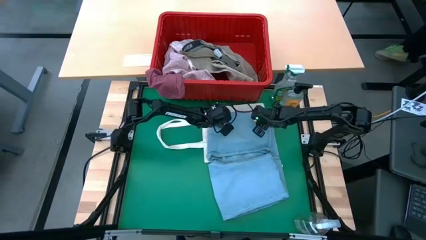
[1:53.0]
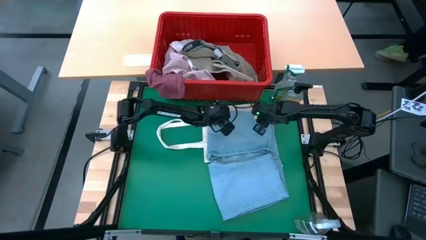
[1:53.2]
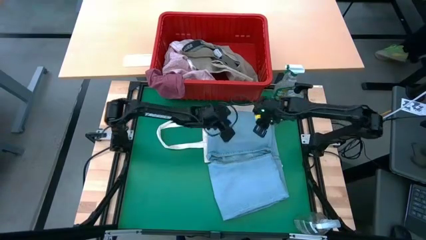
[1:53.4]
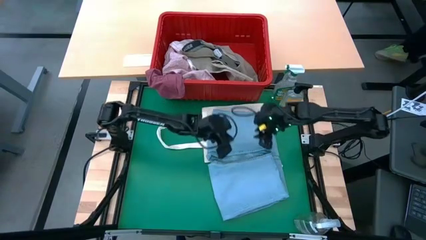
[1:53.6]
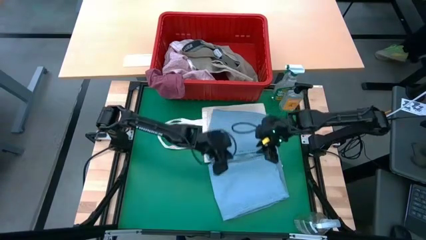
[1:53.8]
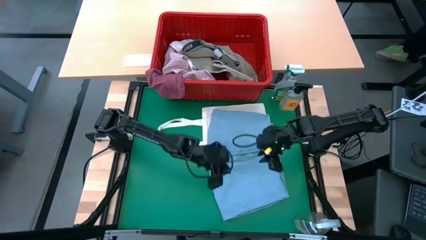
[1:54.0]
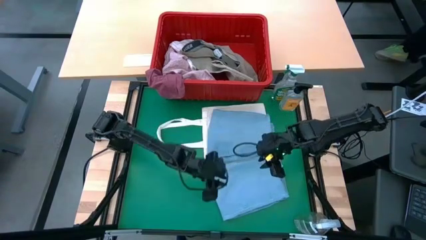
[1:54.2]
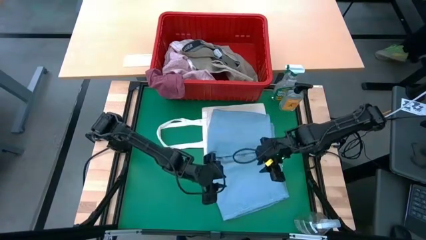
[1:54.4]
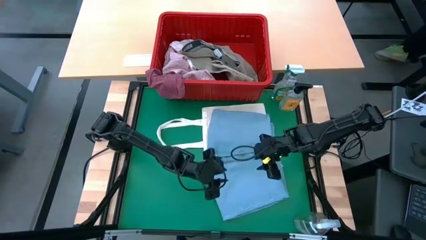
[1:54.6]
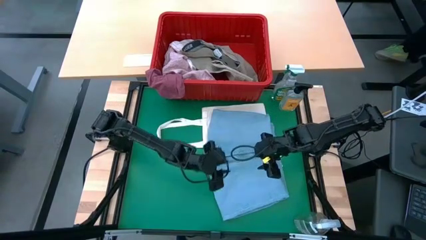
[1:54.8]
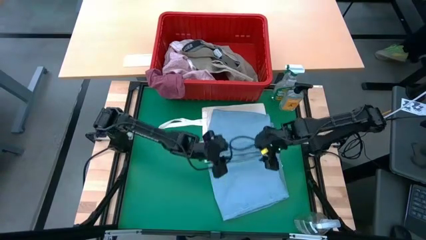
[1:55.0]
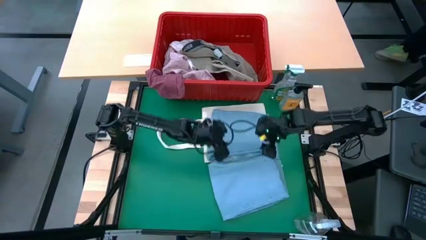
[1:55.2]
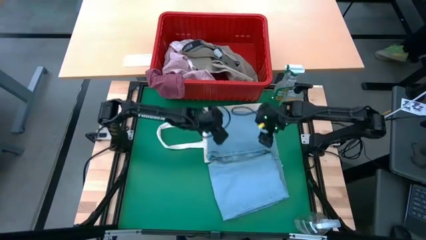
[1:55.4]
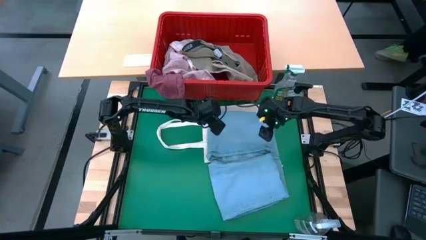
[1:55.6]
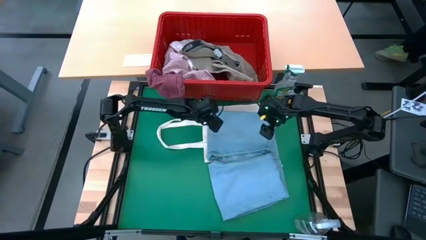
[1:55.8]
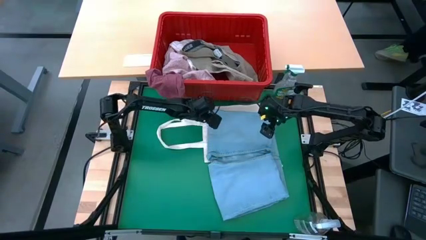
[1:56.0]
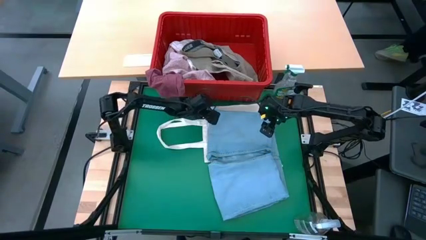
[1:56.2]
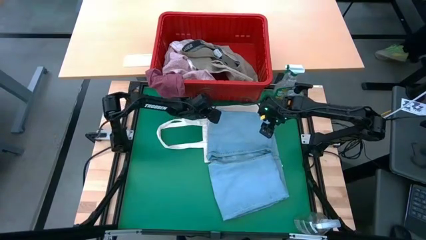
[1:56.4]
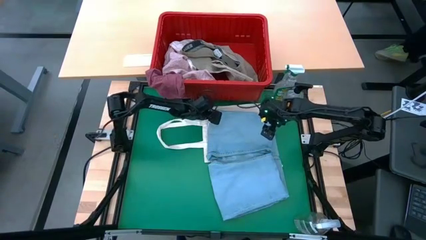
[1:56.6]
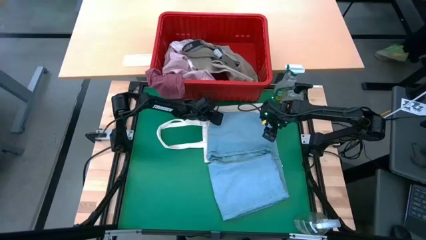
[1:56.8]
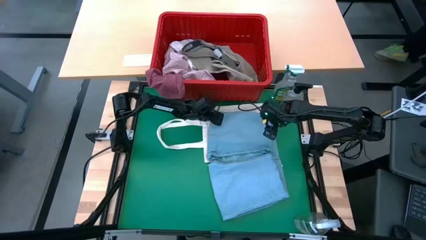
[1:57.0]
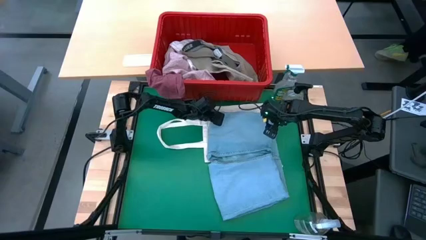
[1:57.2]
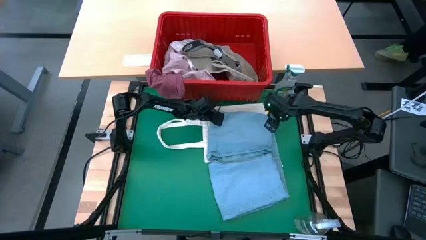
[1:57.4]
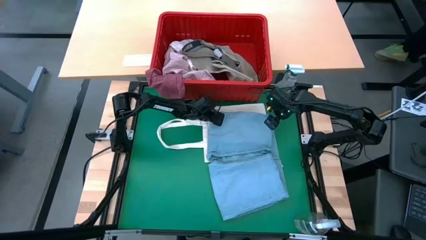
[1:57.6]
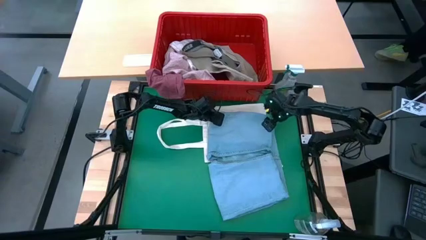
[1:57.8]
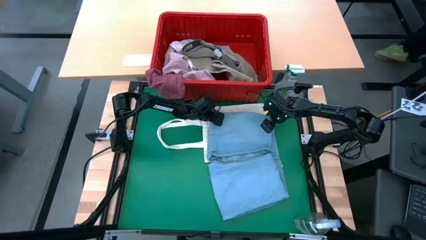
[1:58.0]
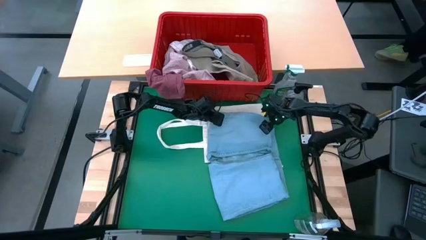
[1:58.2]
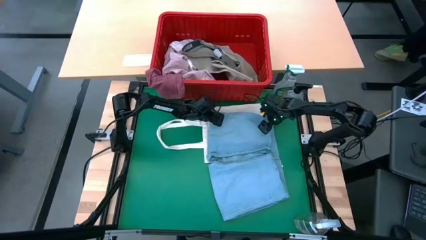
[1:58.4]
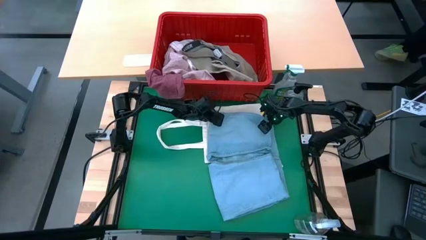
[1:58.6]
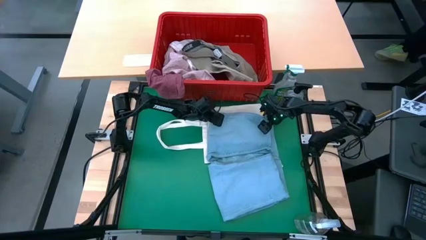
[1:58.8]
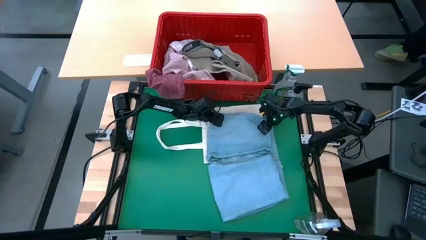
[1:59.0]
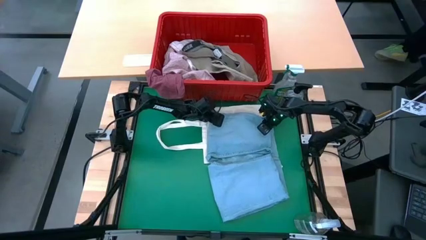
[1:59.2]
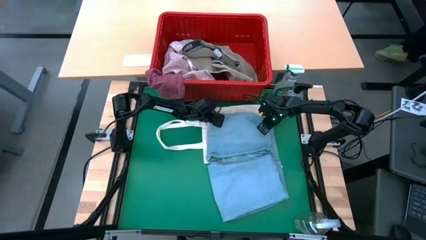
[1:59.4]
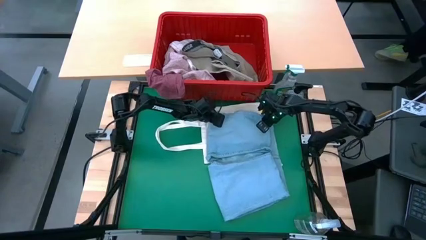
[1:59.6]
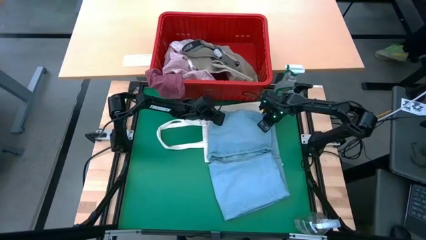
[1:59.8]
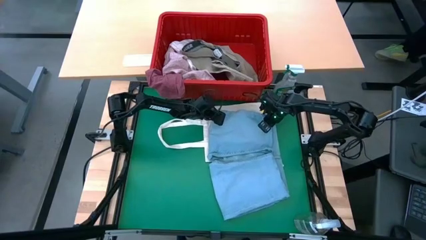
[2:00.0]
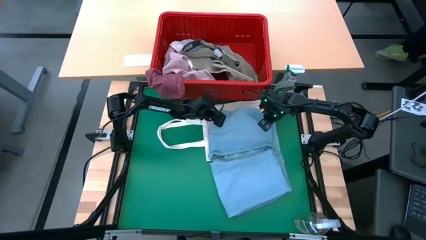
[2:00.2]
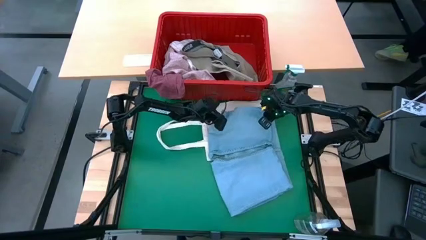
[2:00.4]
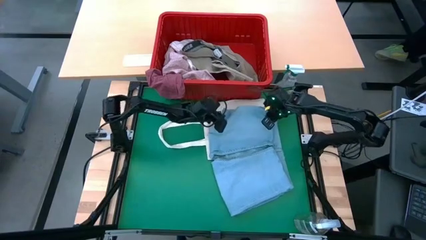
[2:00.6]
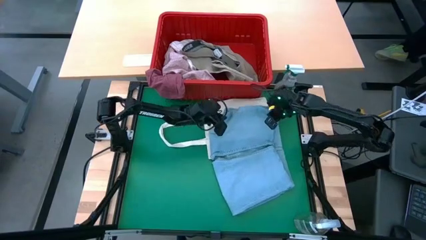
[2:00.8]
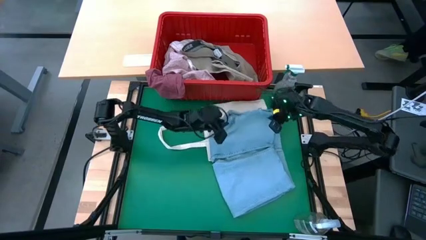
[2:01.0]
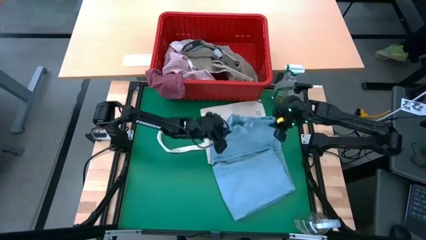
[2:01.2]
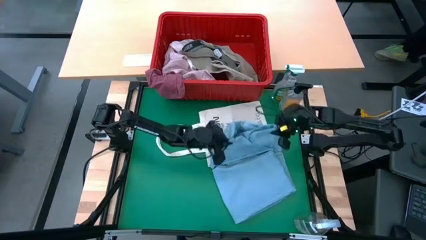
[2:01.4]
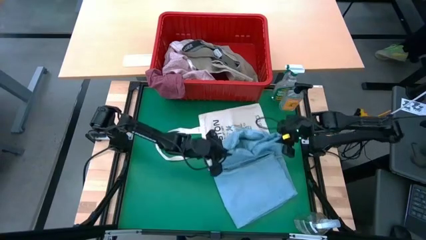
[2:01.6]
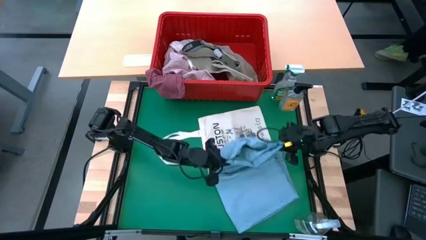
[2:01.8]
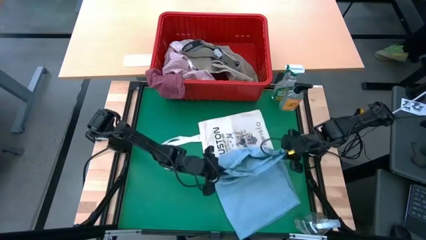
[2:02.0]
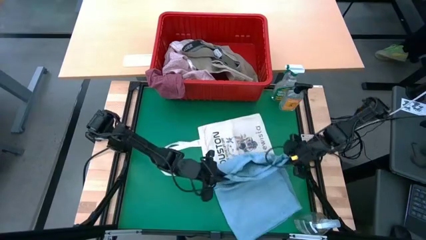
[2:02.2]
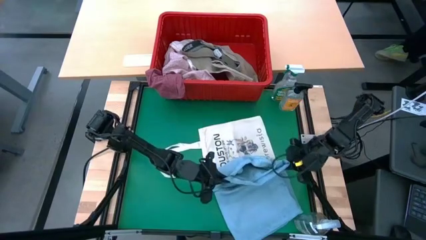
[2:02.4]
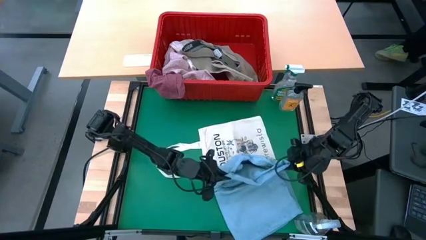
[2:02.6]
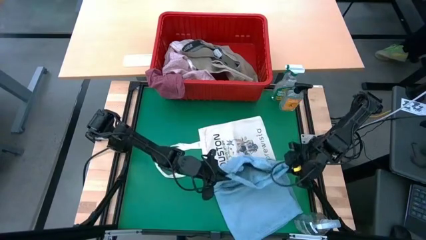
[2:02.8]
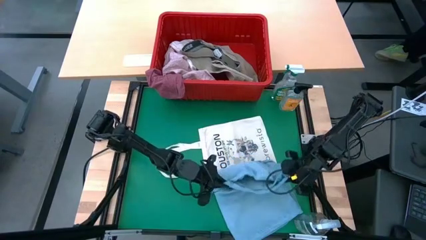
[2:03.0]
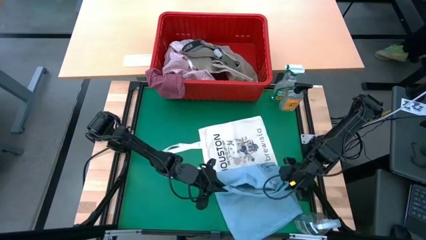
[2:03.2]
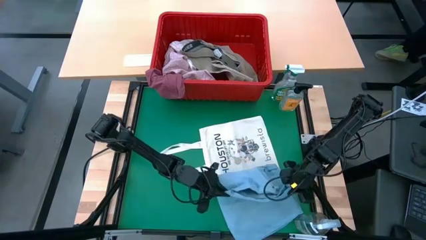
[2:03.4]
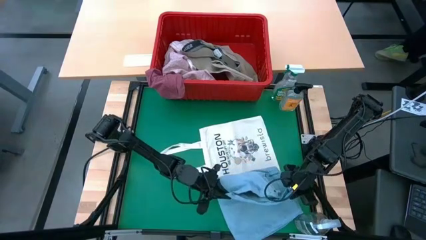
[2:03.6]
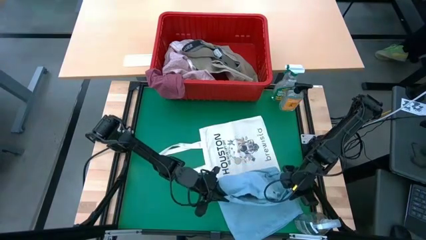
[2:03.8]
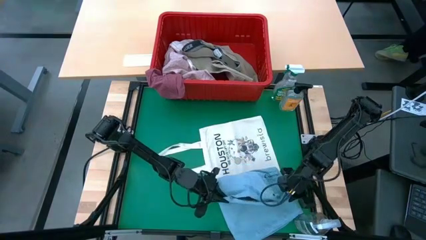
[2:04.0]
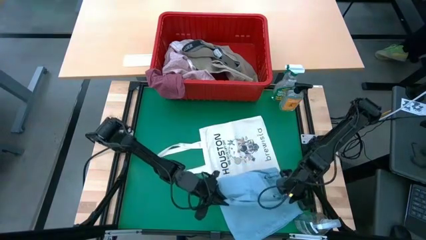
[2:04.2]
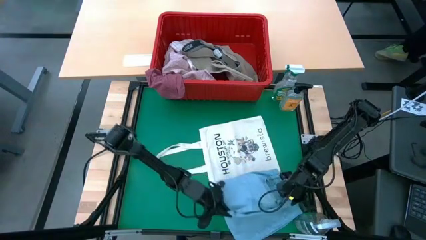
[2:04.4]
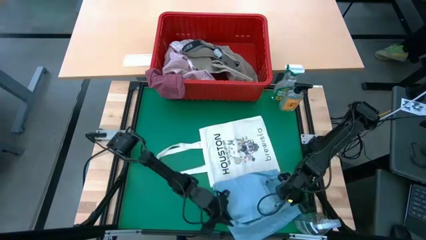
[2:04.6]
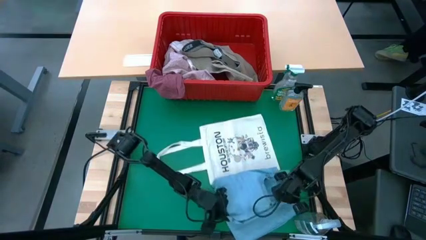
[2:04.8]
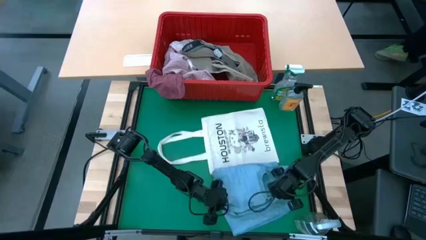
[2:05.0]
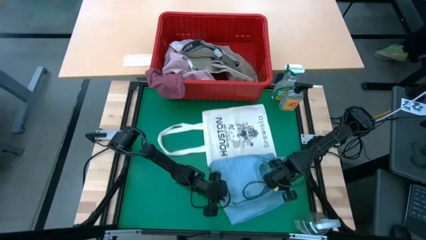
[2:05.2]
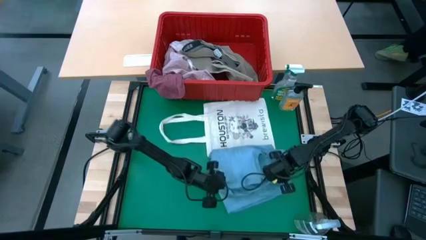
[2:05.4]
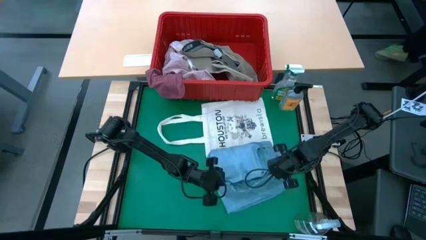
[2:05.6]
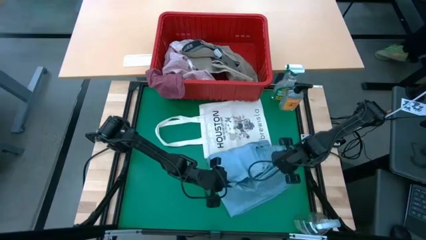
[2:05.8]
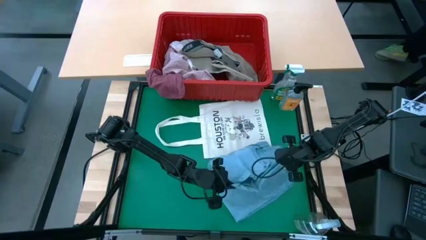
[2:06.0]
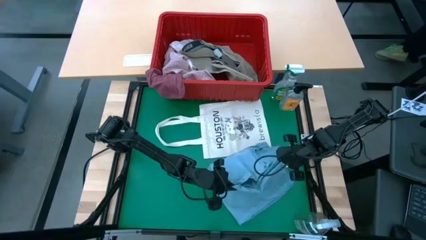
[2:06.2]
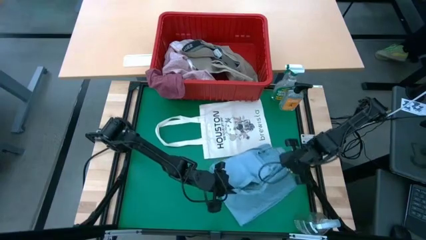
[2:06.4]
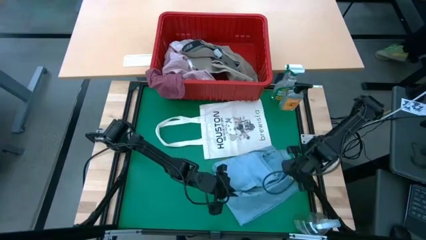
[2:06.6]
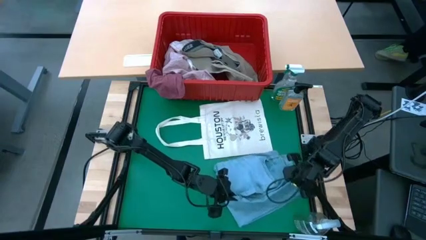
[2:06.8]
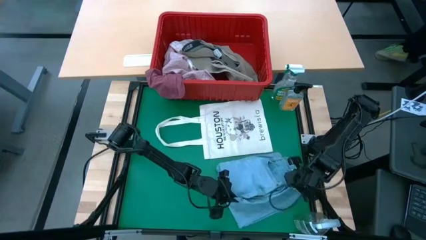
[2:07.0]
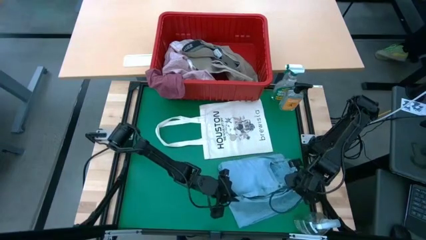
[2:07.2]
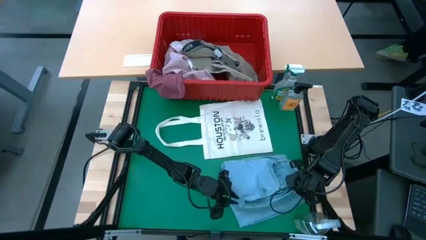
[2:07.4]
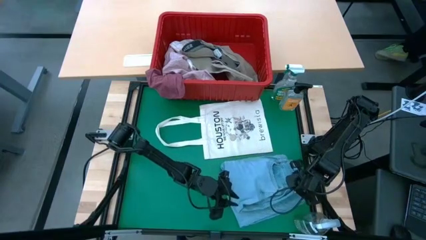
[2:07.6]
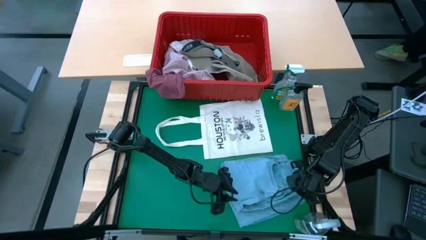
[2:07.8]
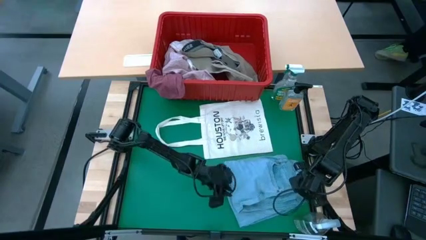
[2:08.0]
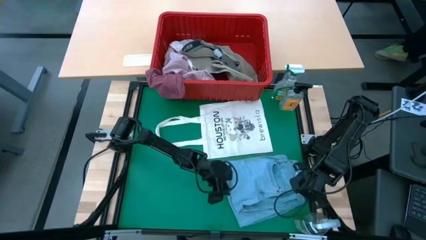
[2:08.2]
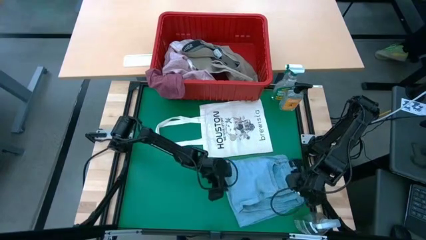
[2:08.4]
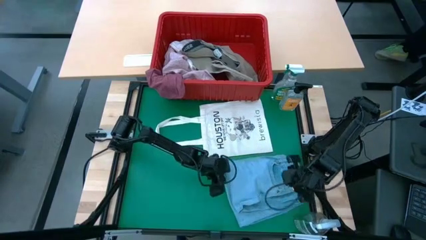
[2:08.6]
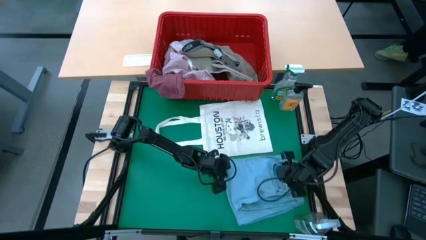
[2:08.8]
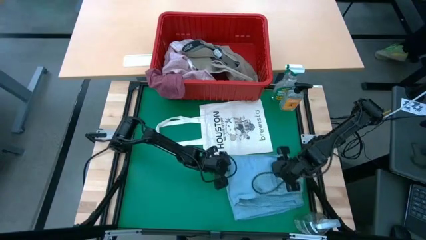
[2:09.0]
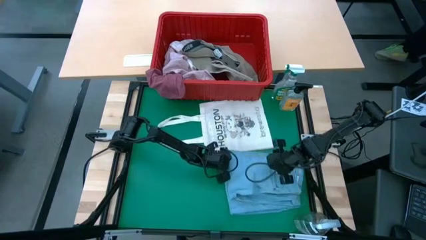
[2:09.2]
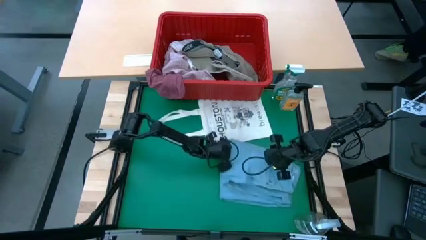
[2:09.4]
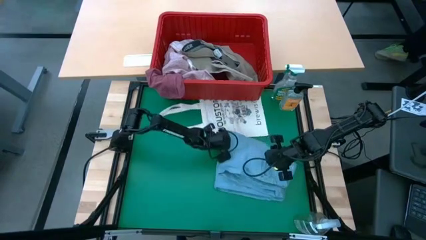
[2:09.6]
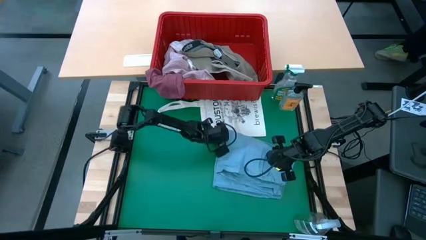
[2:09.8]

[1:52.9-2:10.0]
Task: Fold Laundry from Bin
Fold the blue pants from the red laundry basket
